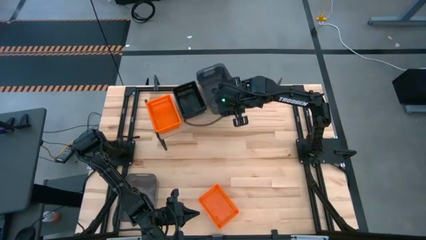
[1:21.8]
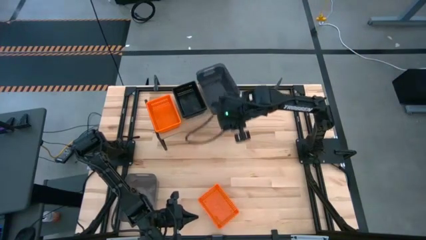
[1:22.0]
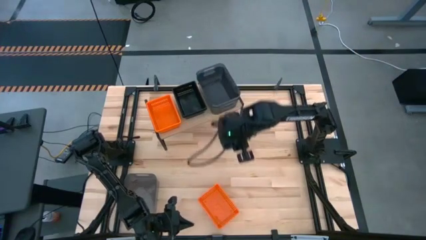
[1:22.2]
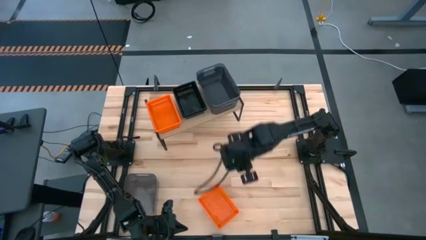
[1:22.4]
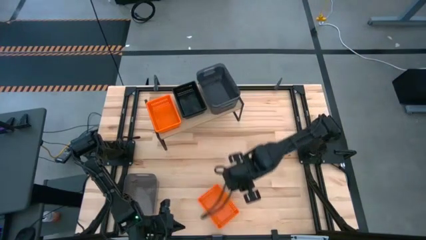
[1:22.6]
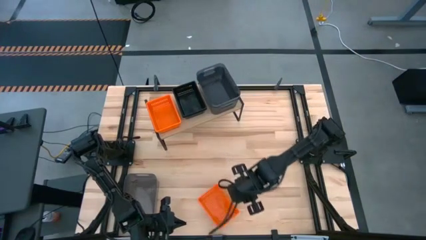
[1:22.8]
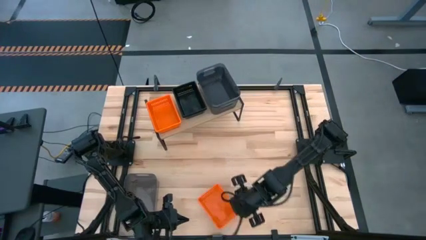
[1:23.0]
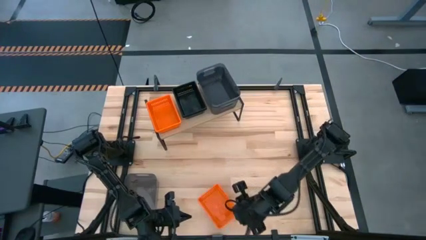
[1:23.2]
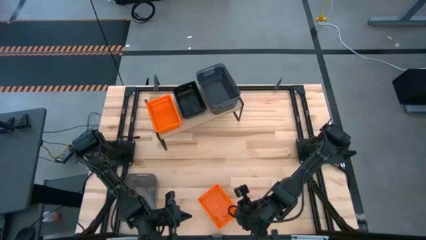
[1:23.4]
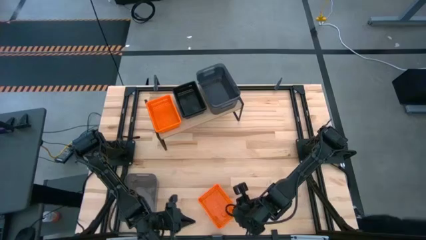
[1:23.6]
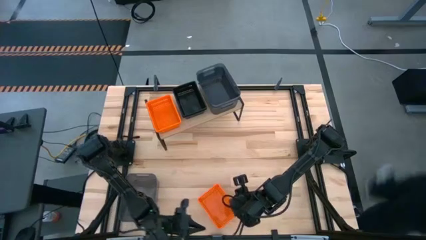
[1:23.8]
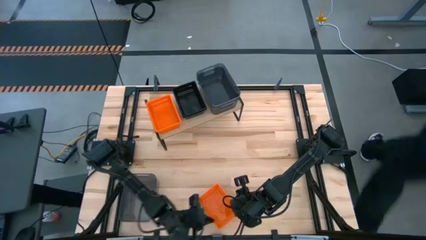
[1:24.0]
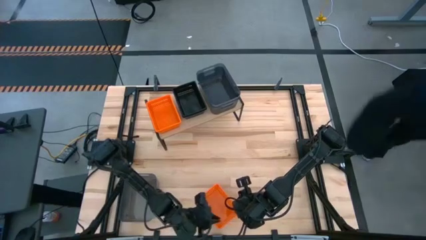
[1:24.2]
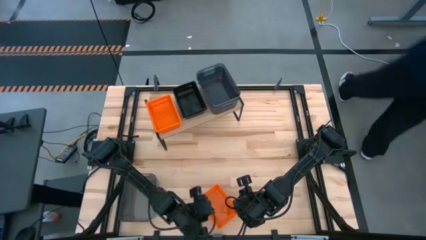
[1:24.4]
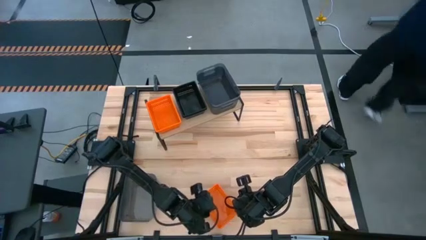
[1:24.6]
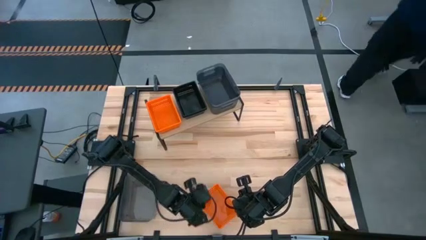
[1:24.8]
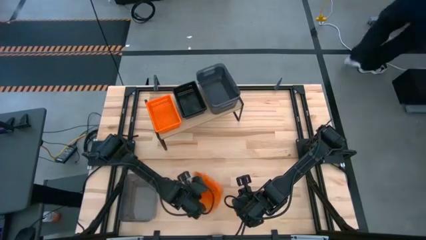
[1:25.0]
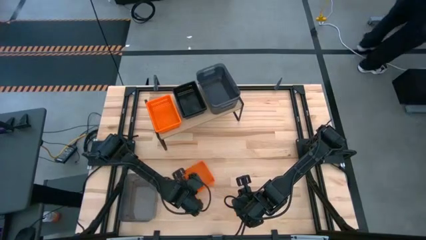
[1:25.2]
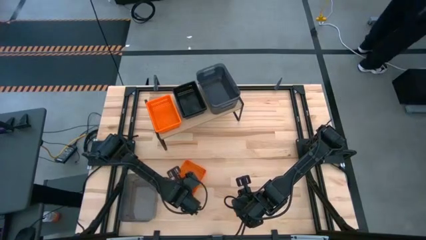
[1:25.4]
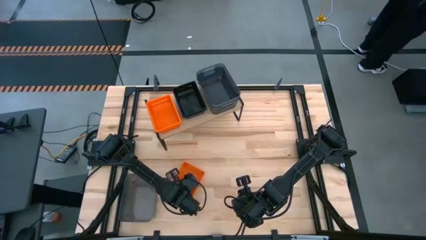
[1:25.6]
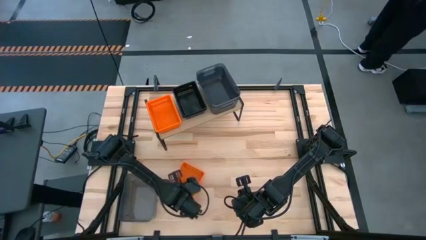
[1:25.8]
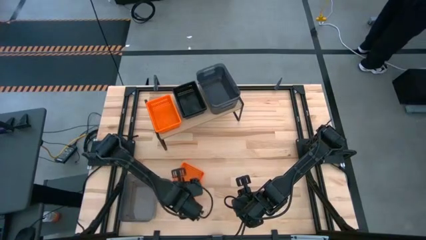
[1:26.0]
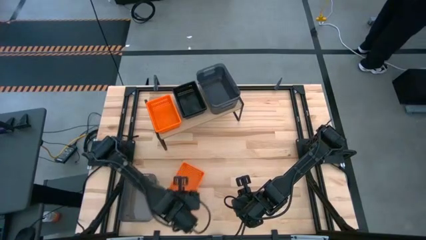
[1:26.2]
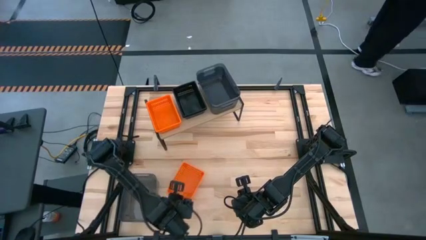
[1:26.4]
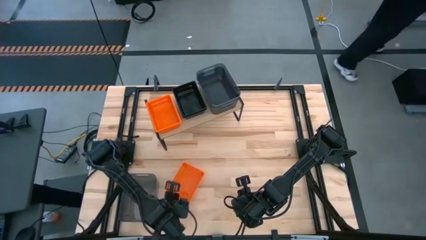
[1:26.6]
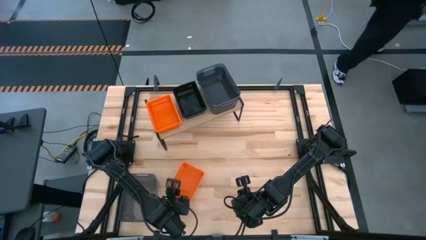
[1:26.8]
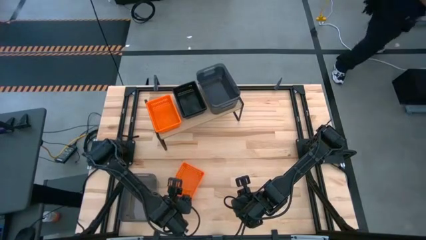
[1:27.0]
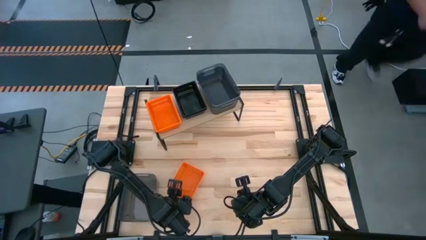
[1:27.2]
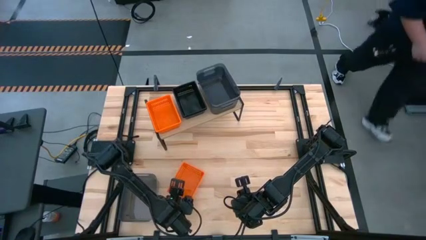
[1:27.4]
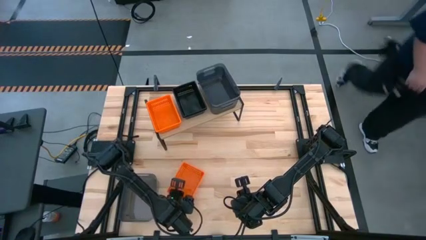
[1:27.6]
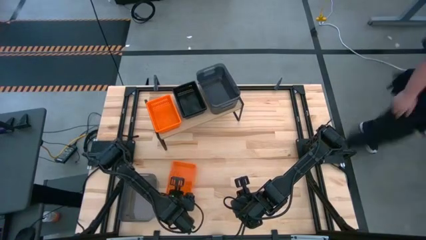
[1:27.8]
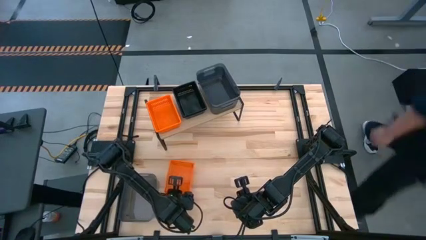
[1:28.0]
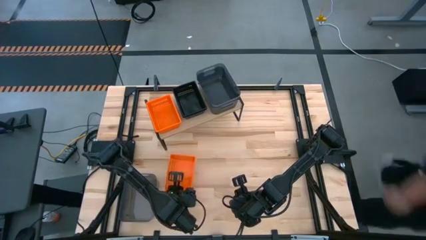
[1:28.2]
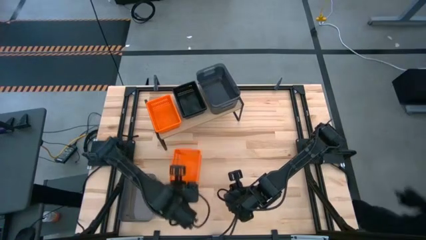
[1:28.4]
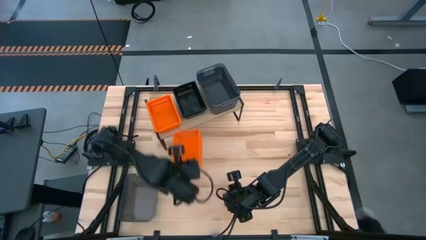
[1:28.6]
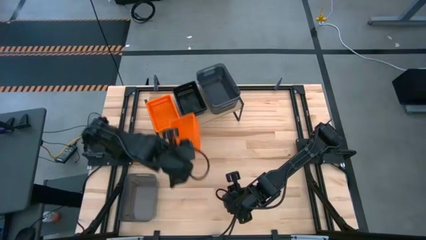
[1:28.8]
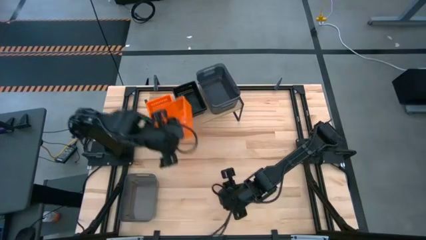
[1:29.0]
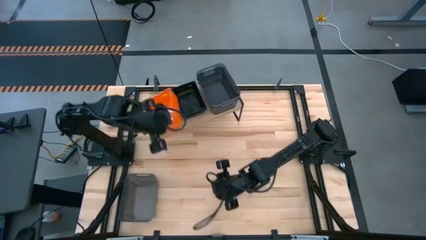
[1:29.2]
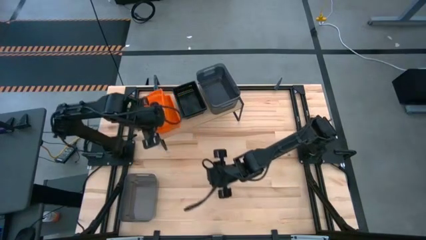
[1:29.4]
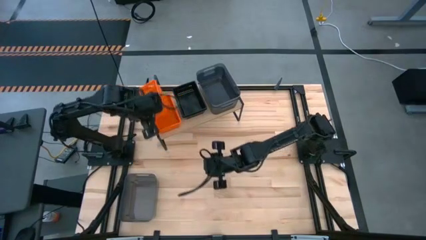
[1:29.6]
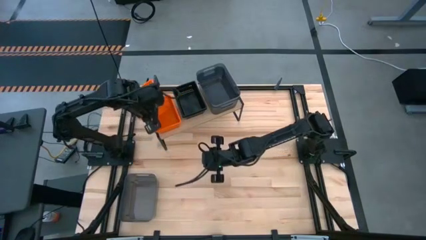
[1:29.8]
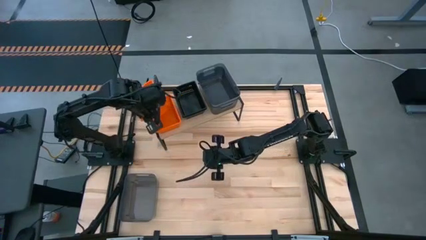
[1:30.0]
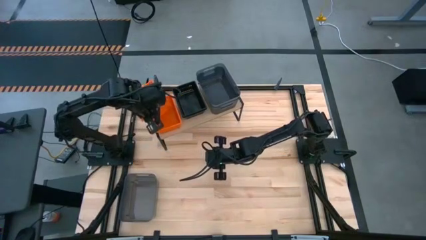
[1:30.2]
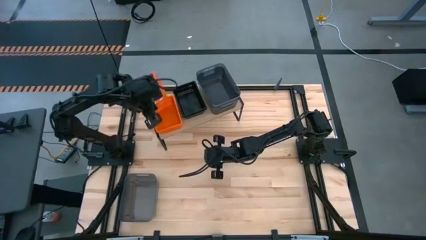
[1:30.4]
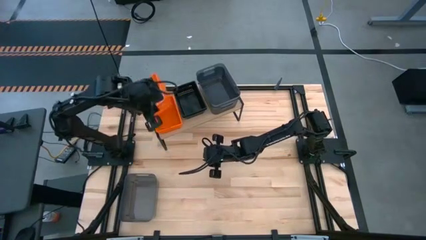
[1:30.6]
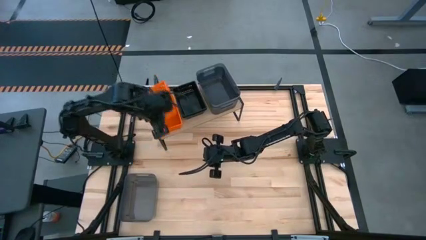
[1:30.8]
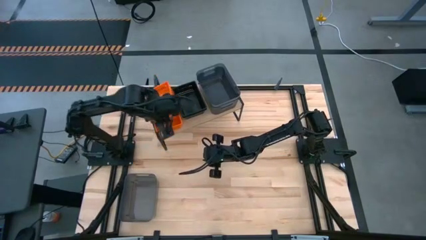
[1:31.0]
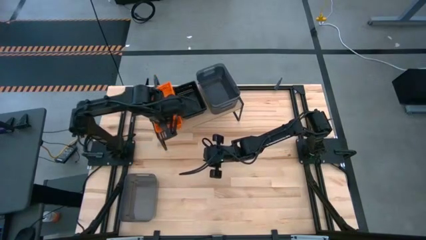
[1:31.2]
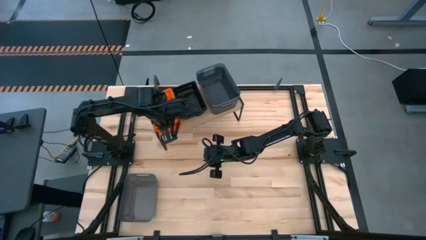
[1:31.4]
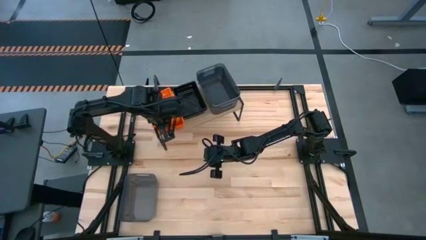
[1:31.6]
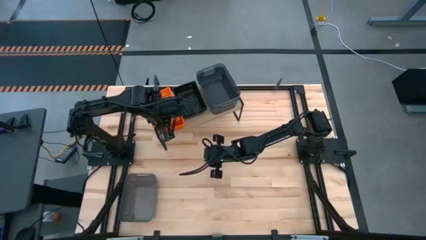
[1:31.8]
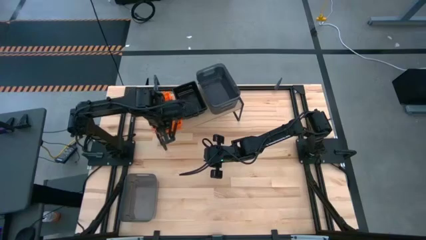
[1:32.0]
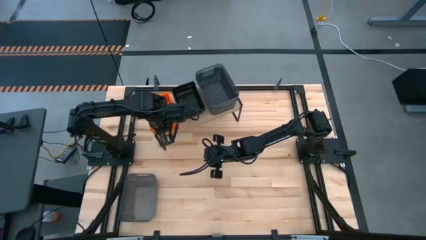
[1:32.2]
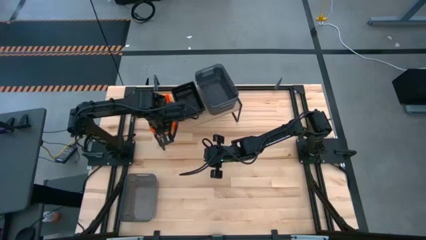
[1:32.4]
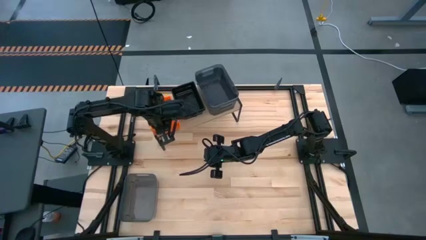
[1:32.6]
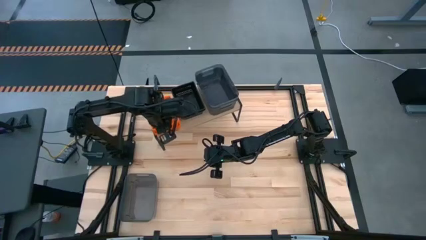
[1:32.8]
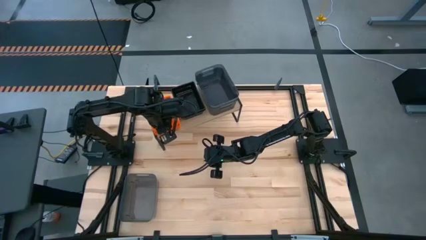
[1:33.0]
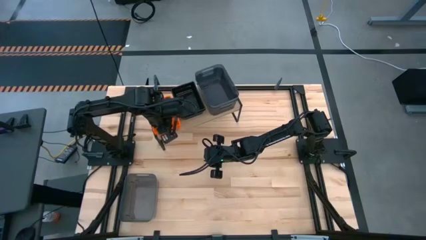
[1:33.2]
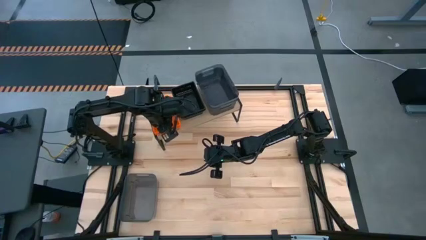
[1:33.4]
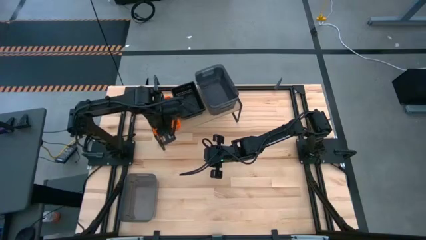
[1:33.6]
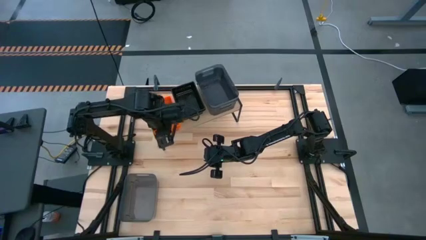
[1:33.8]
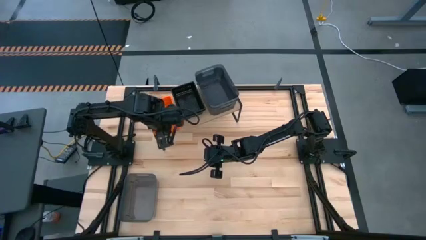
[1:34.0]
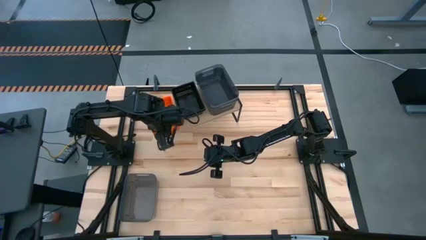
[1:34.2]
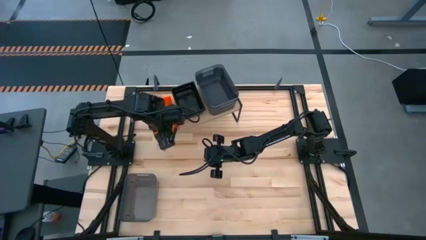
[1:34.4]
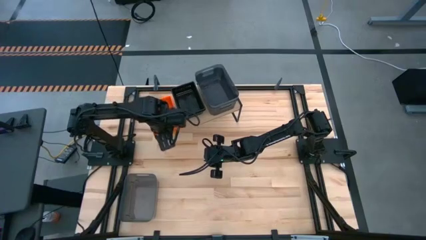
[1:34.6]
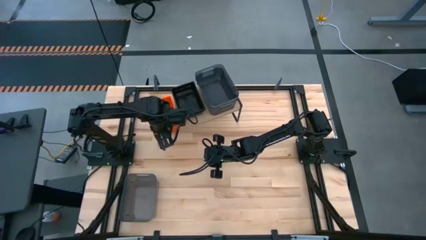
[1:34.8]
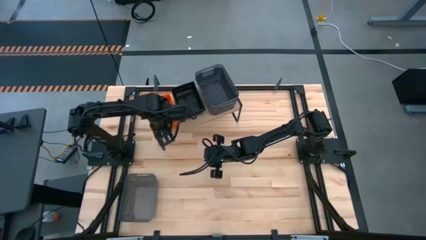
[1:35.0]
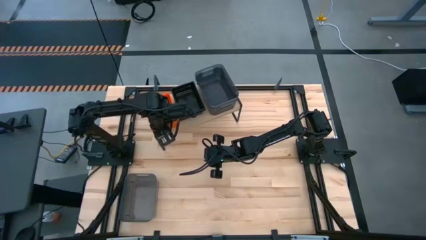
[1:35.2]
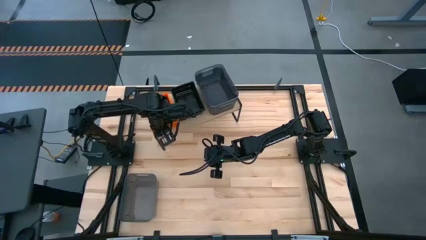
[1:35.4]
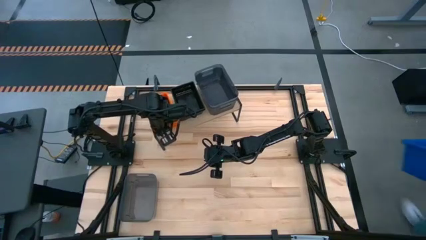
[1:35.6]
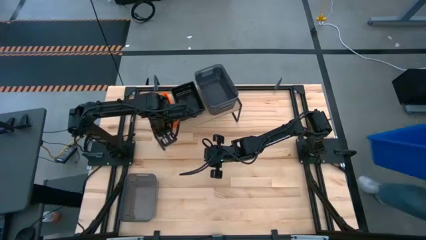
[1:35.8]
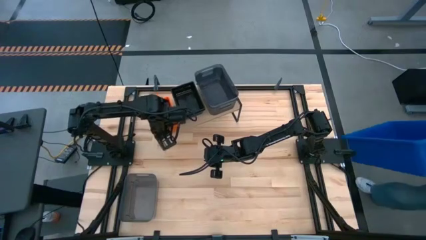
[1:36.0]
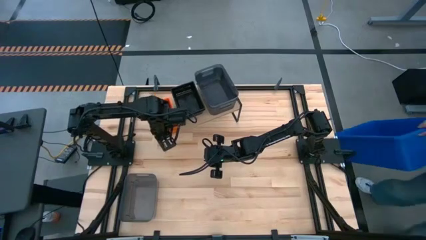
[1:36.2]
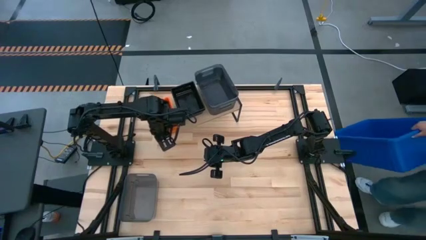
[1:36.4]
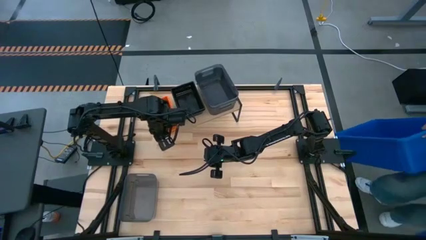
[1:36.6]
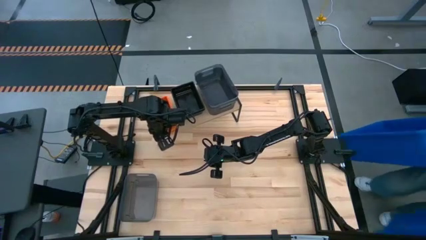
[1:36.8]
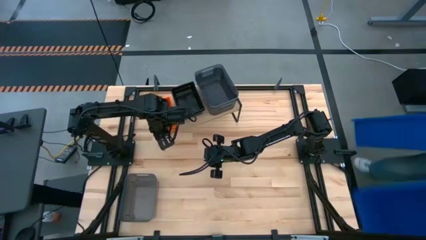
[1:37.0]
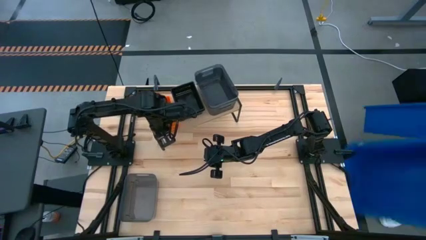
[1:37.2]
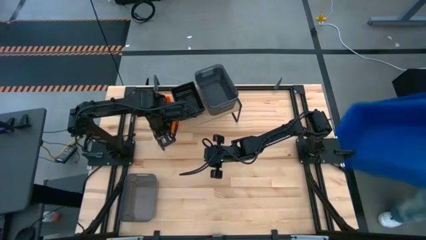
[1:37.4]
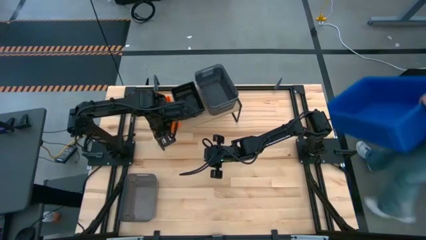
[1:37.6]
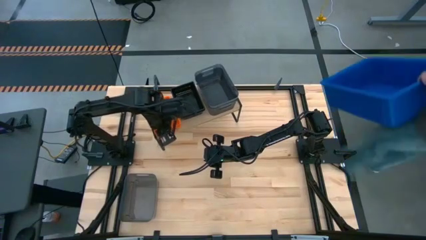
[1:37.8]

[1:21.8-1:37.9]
Task: Stack baskets on shelf by color
Stack the orange bin on top of the orange bin on the shelf
